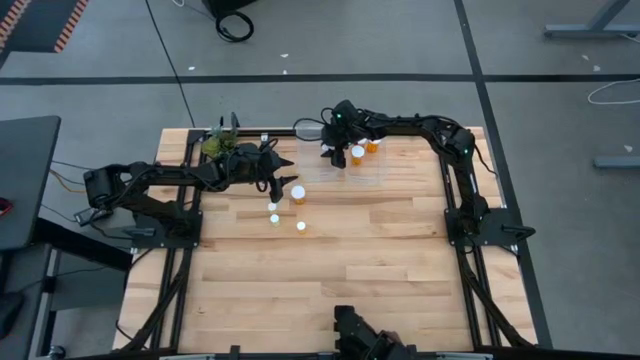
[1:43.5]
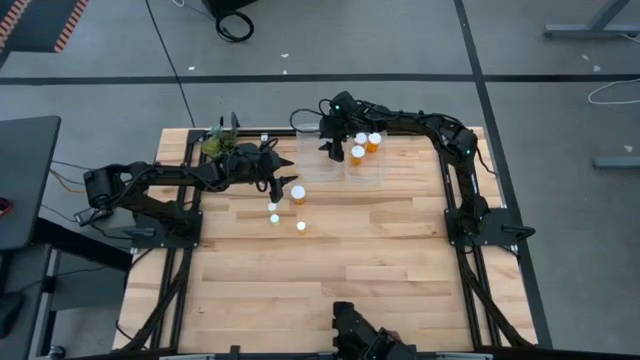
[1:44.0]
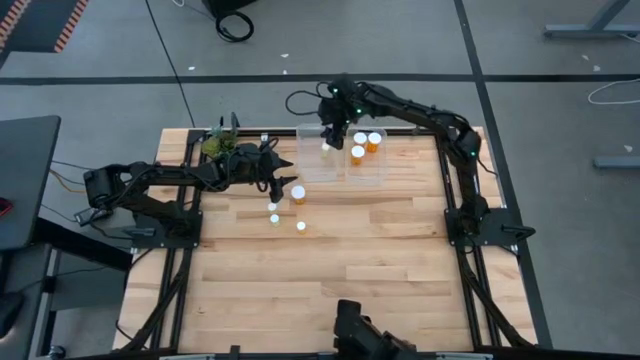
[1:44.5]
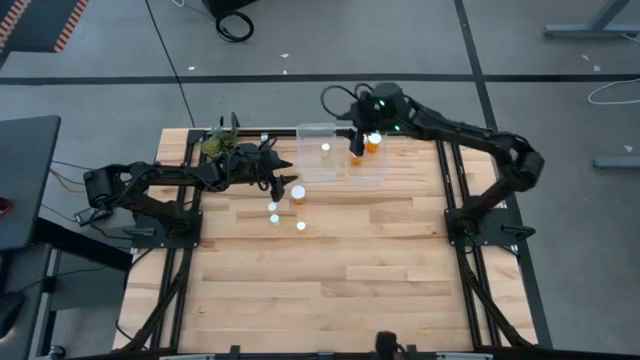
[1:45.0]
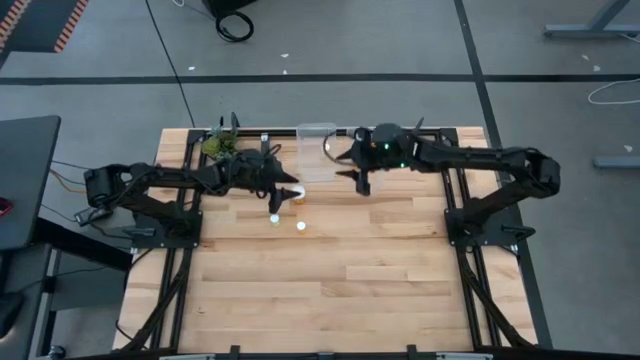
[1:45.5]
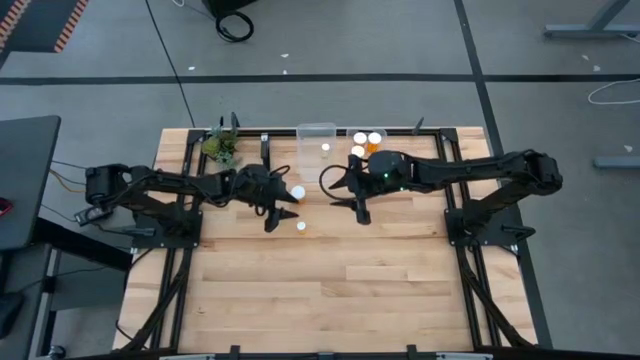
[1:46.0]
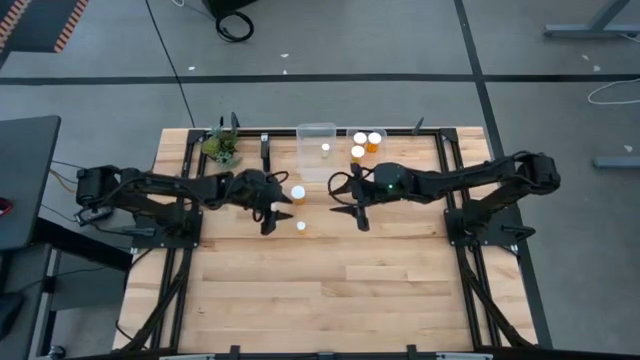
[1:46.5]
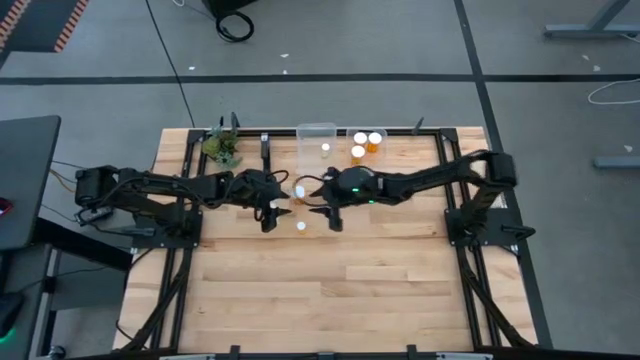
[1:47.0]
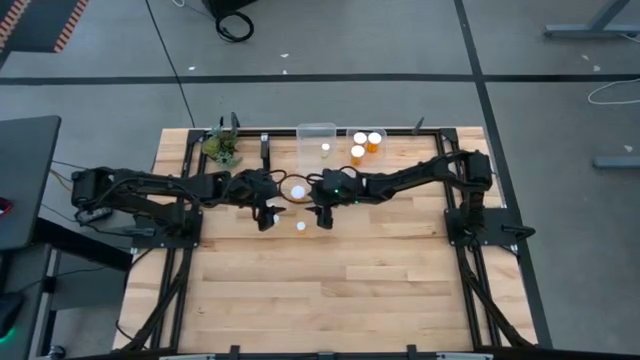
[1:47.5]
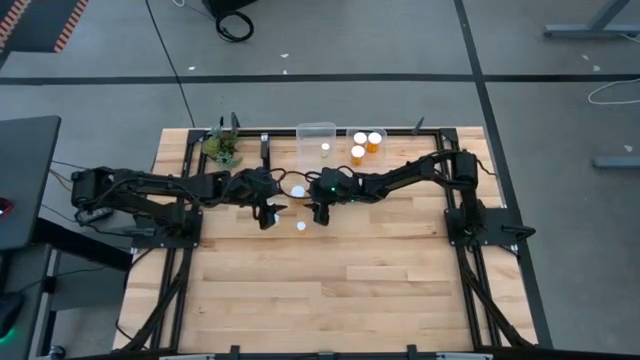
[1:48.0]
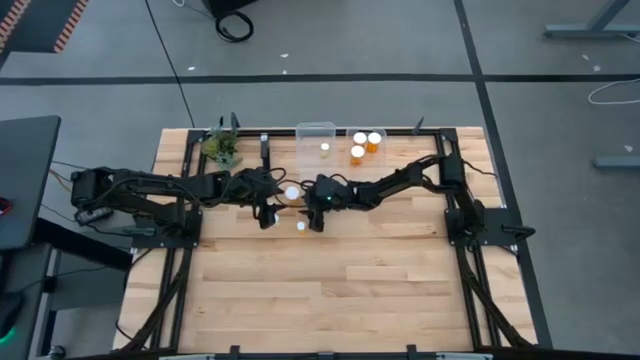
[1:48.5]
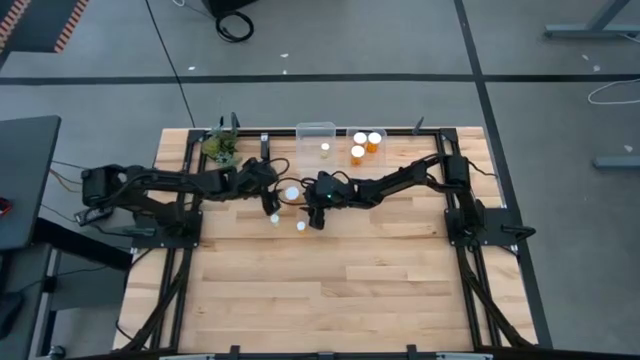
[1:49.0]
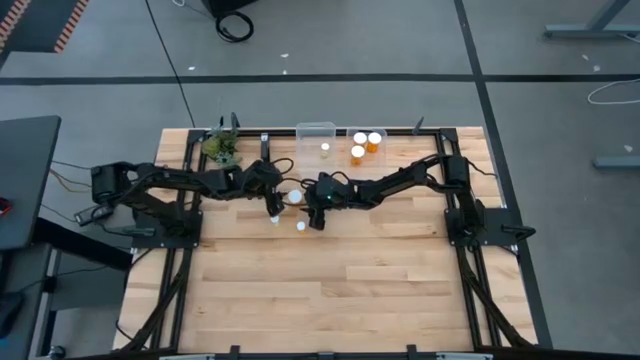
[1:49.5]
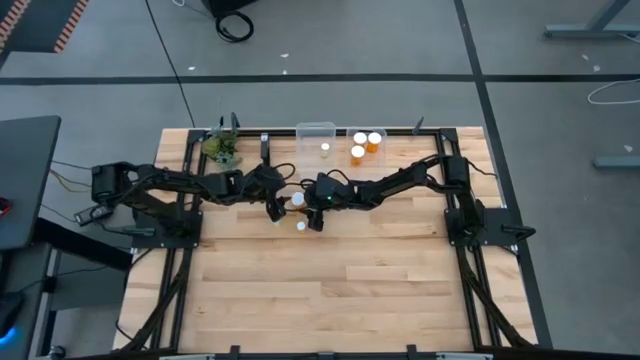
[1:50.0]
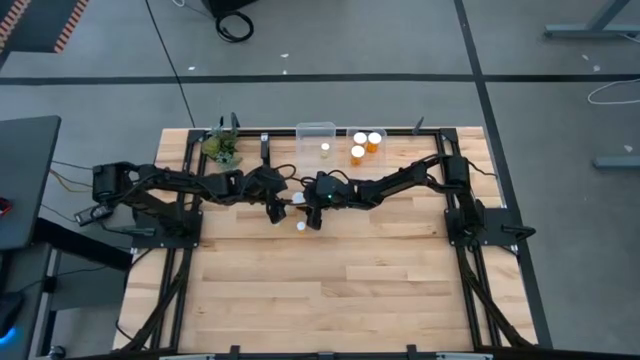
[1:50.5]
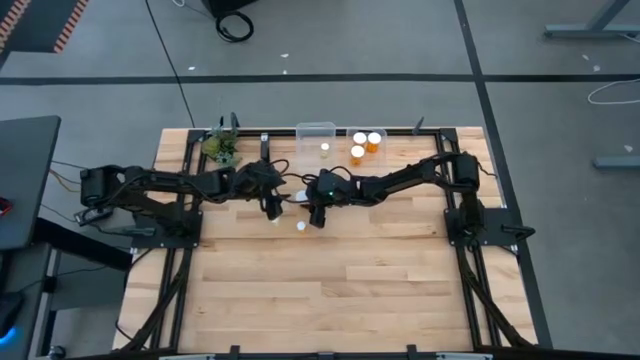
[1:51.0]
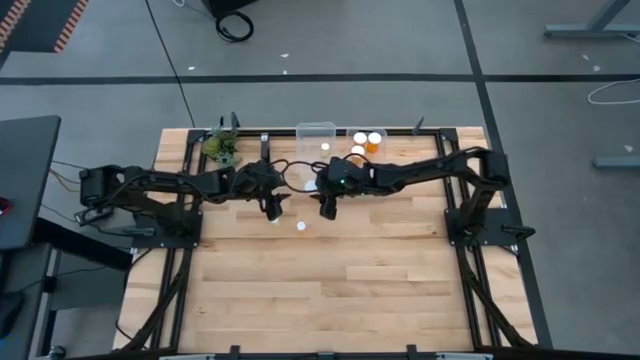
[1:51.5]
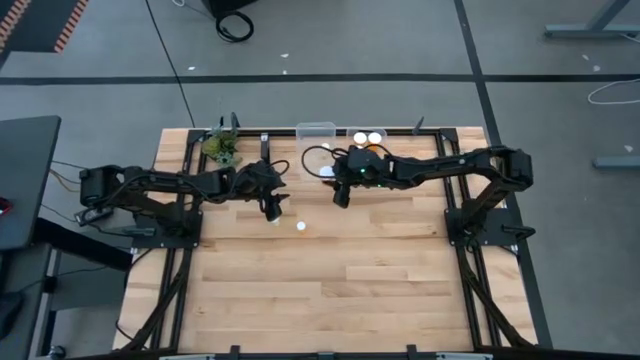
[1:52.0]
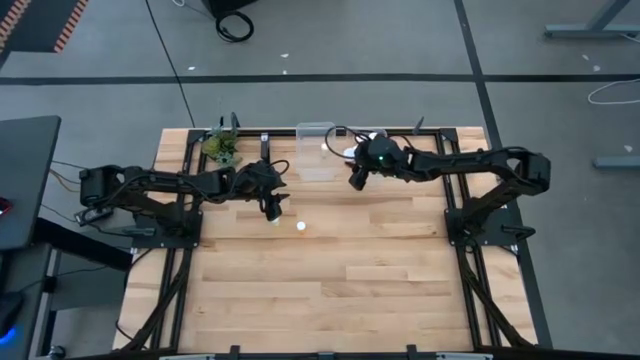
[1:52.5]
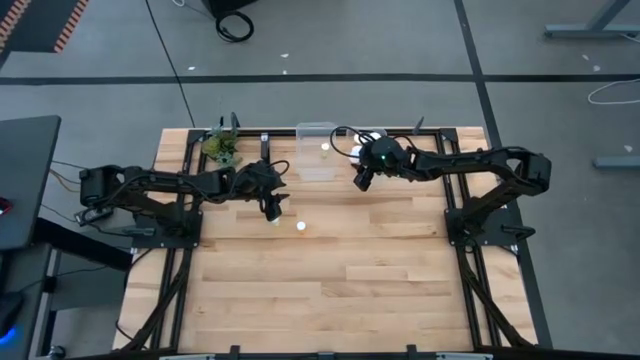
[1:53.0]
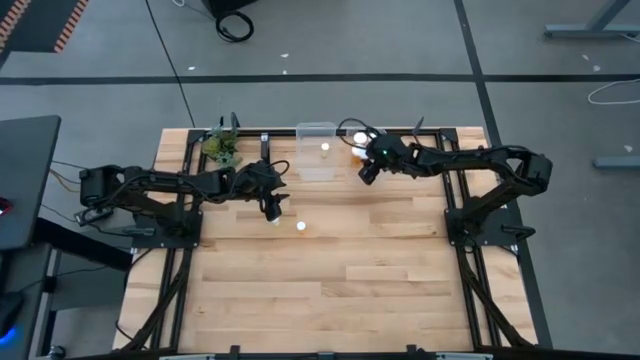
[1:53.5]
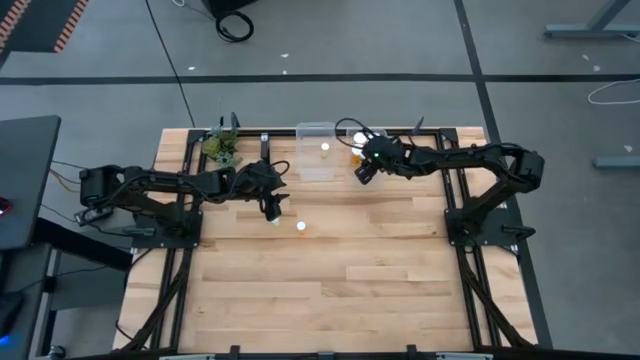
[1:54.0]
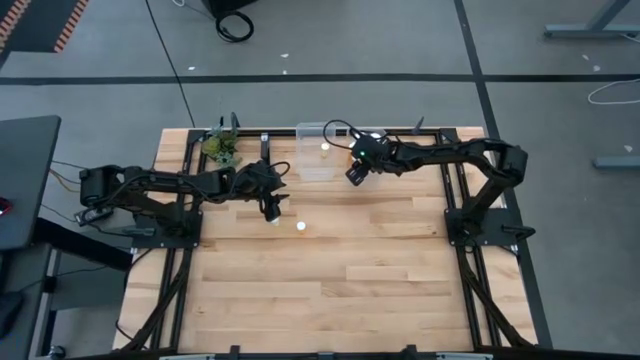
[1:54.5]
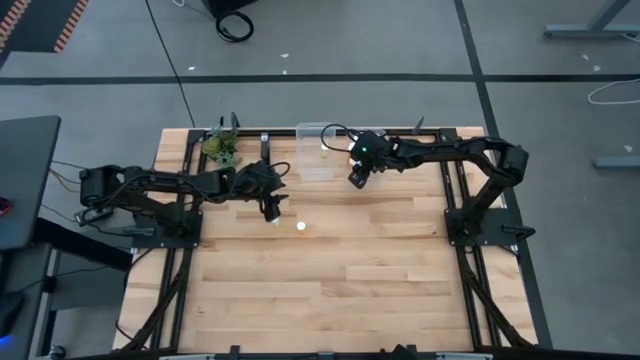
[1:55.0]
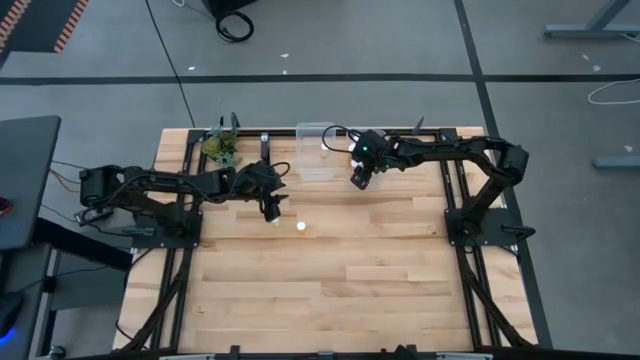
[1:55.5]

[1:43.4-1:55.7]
Task: Pick and place medicine bottles into bin by pill shape (circle, oval)
Put the big orange pill into the right transparent bin

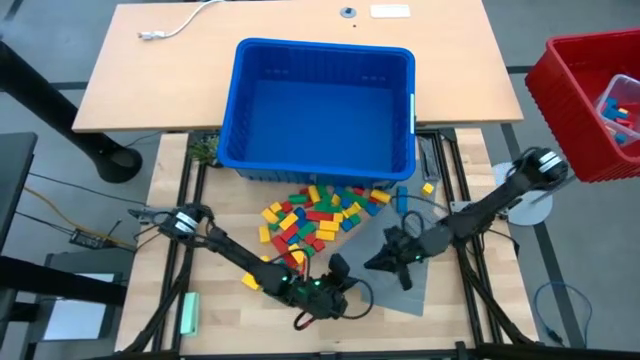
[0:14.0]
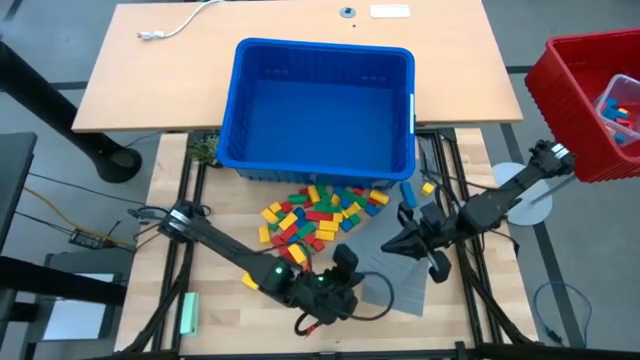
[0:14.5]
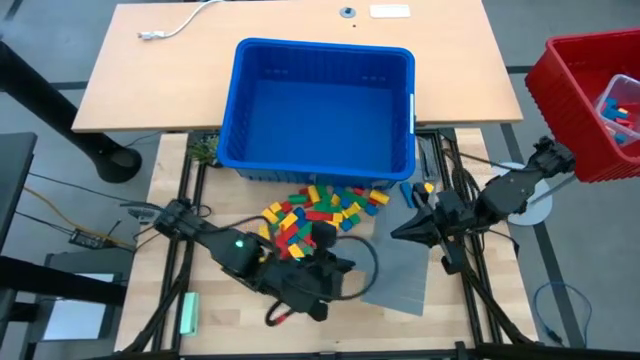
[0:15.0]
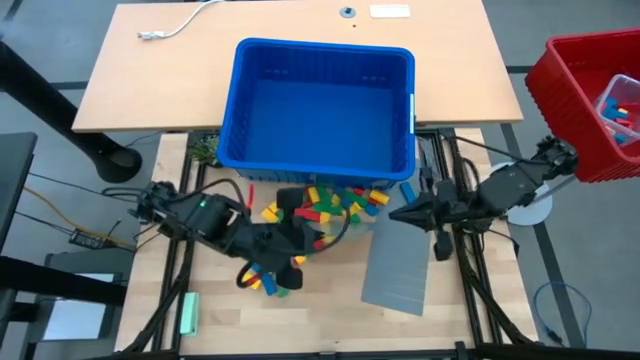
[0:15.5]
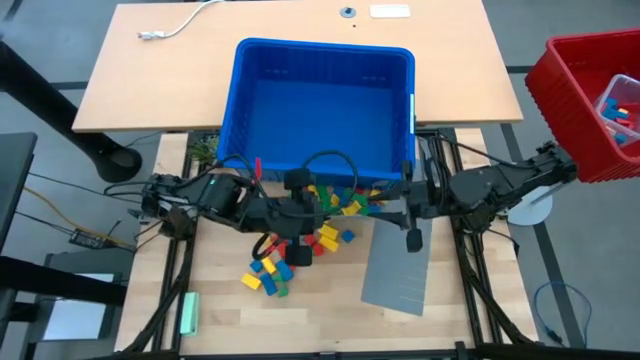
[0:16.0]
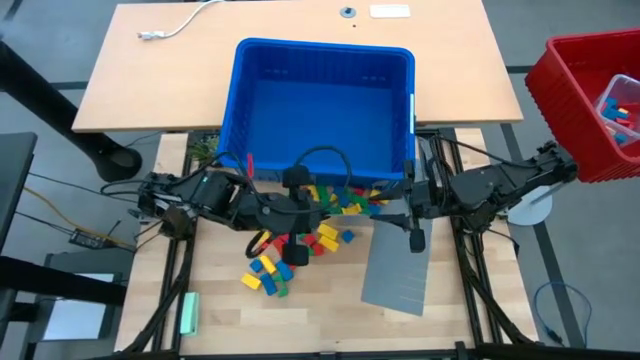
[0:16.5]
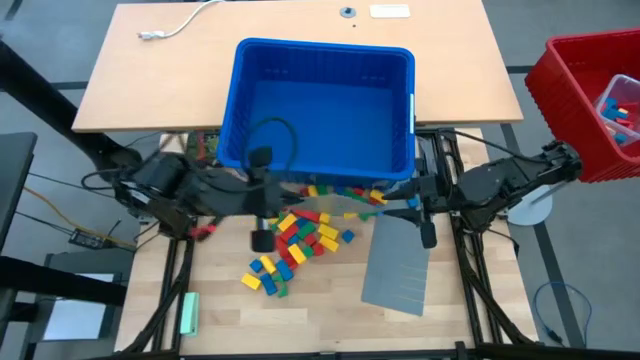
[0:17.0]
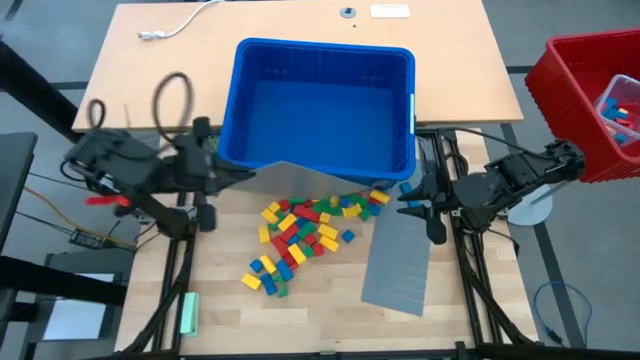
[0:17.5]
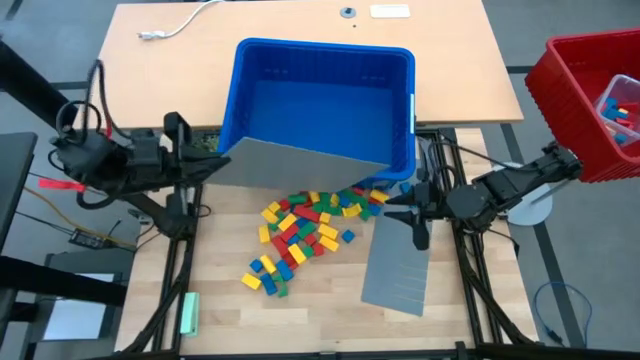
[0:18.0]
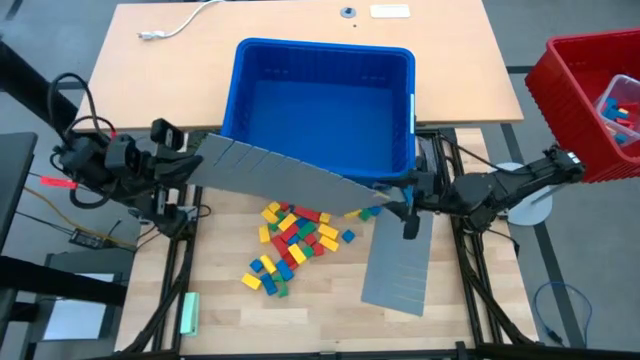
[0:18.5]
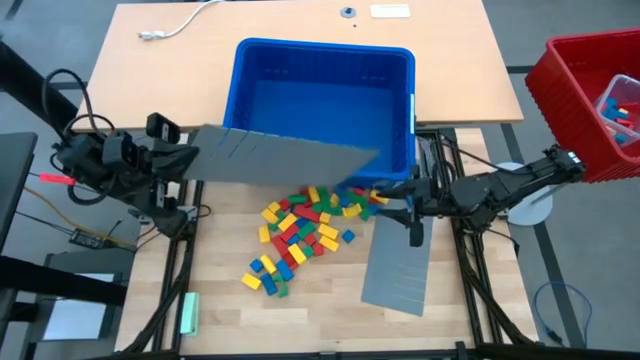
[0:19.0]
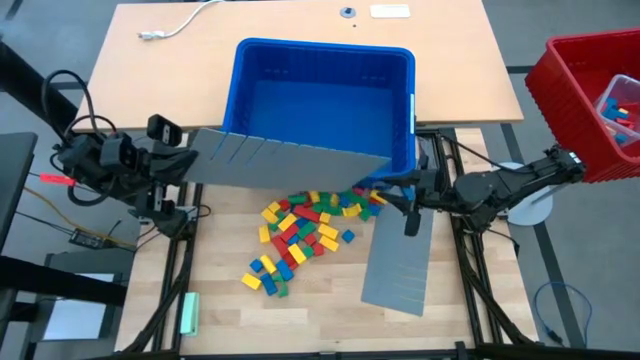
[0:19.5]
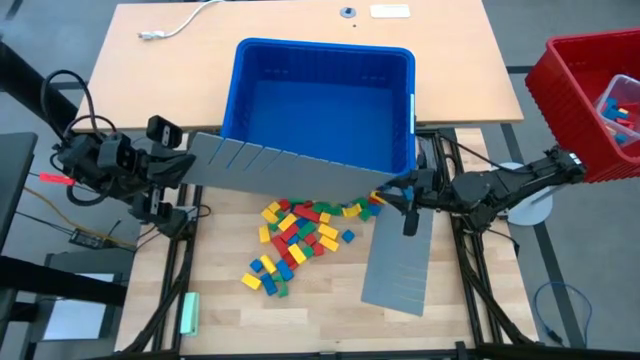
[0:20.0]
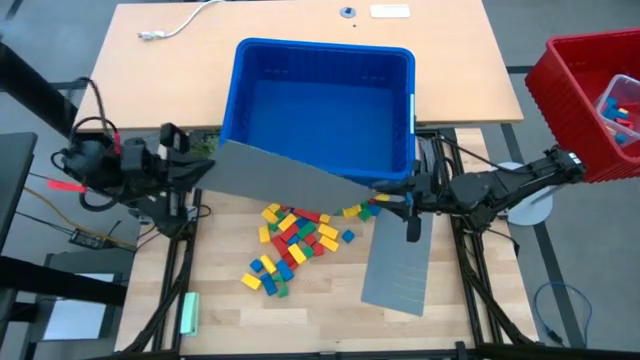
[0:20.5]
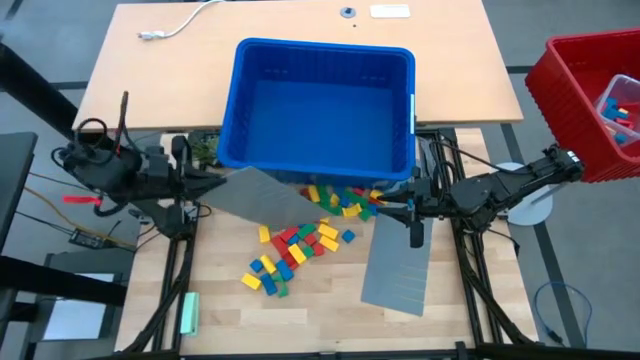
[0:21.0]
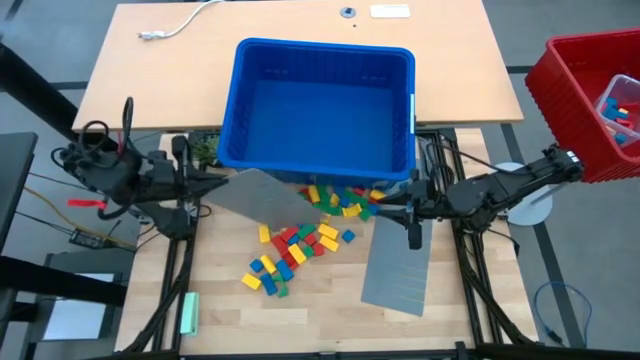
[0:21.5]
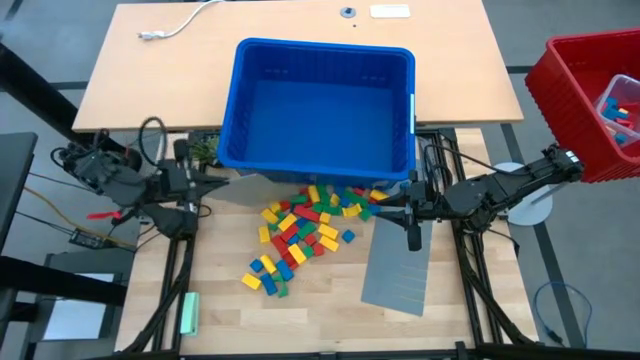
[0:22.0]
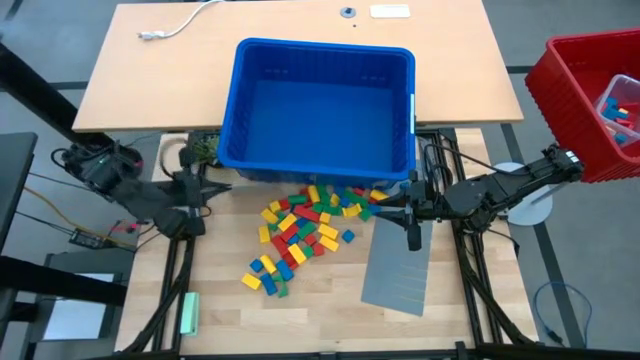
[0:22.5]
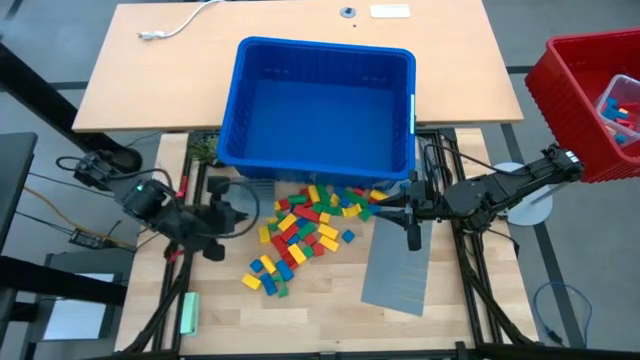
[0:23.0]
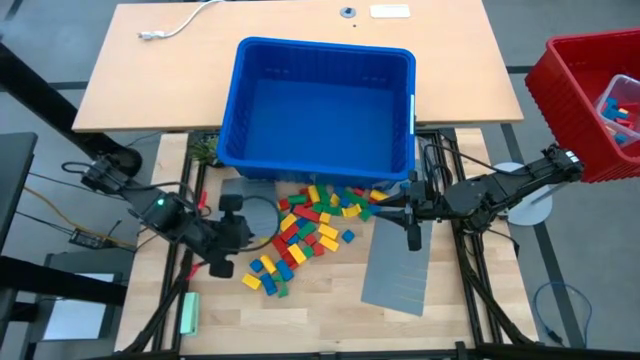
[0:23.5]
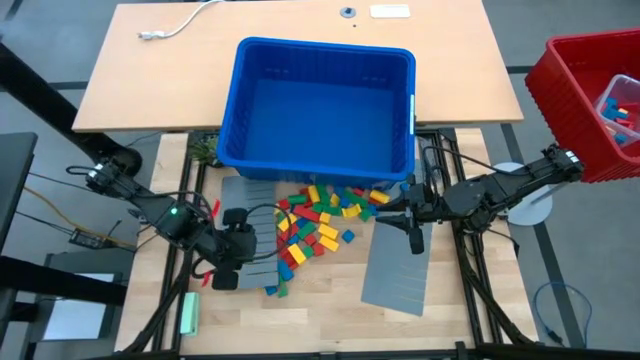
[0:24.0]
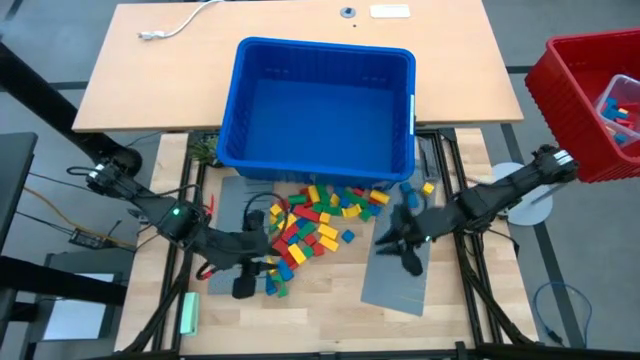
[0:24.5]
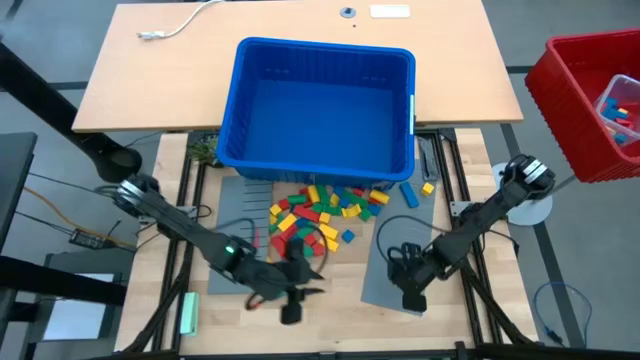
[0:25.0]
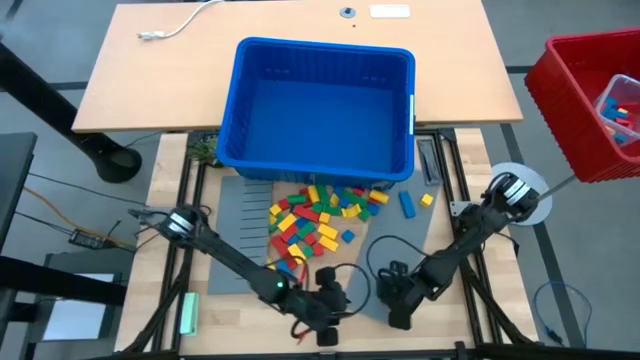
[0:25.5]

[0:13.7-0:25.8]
Task: Sort blocks
Assemble the blue bin using gray bin divider
